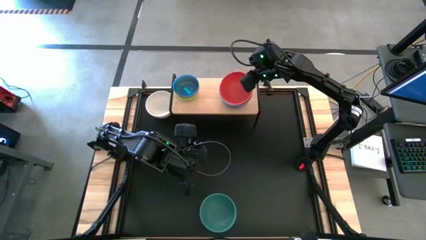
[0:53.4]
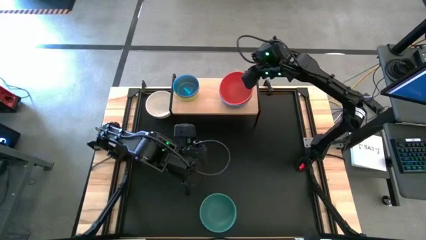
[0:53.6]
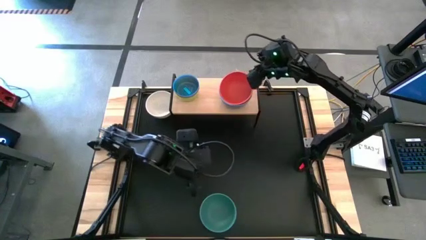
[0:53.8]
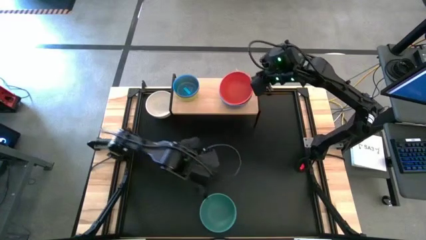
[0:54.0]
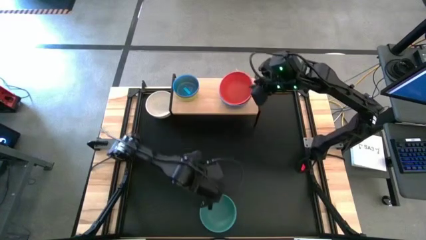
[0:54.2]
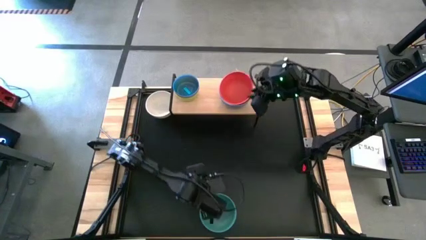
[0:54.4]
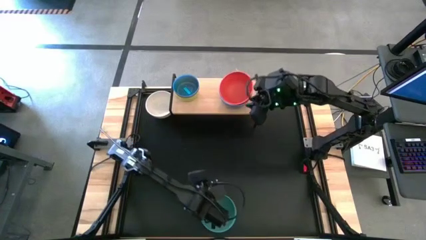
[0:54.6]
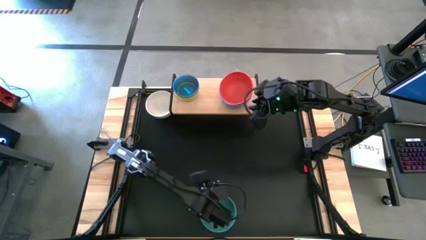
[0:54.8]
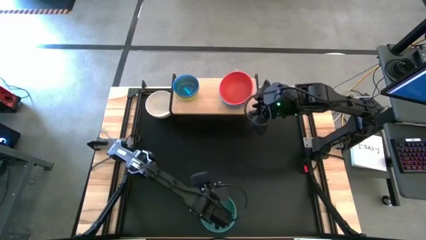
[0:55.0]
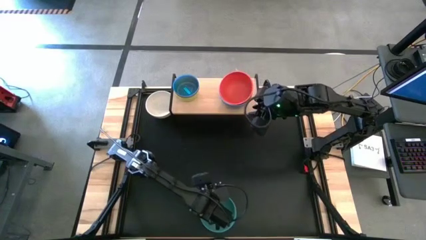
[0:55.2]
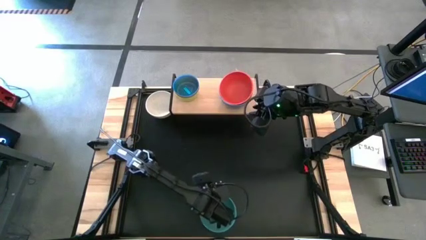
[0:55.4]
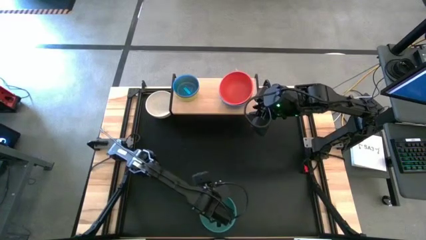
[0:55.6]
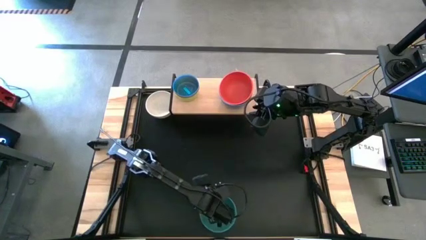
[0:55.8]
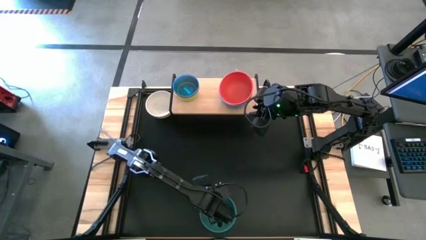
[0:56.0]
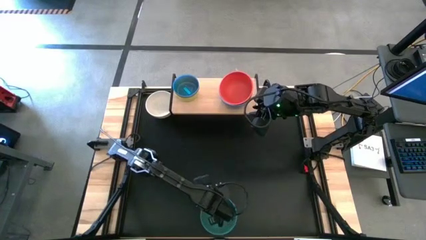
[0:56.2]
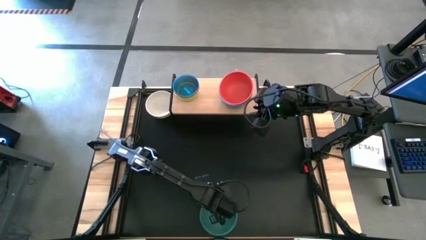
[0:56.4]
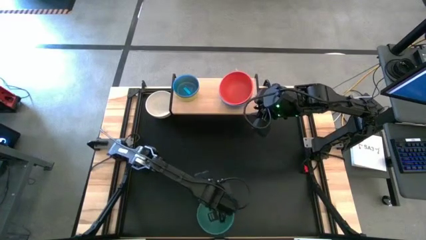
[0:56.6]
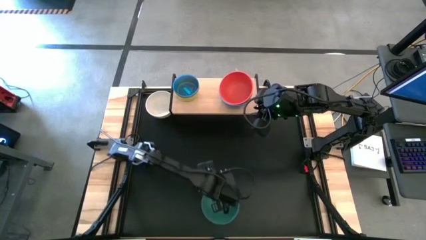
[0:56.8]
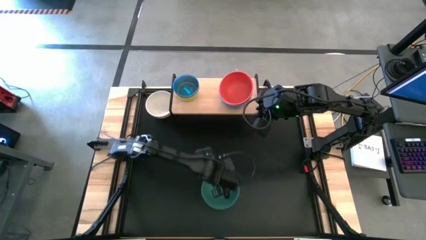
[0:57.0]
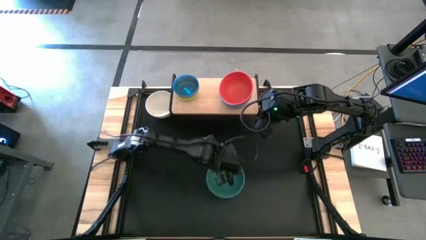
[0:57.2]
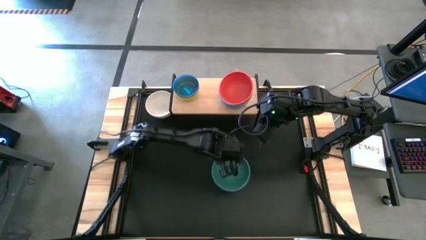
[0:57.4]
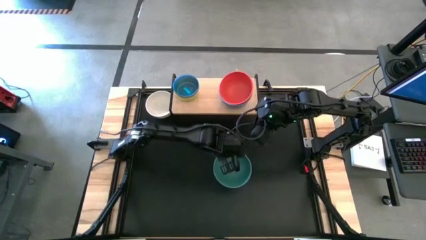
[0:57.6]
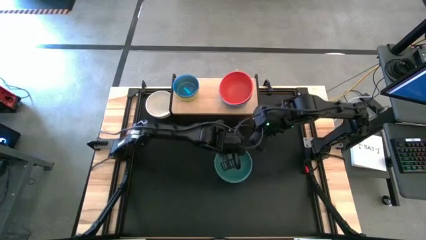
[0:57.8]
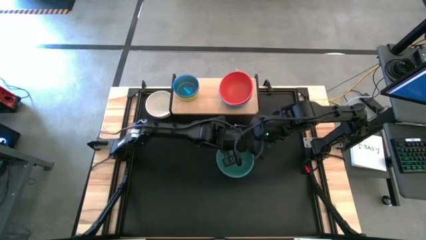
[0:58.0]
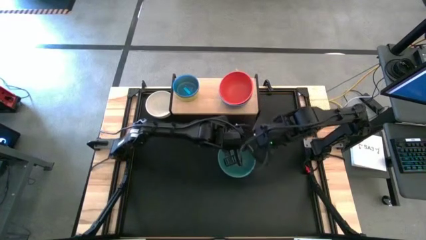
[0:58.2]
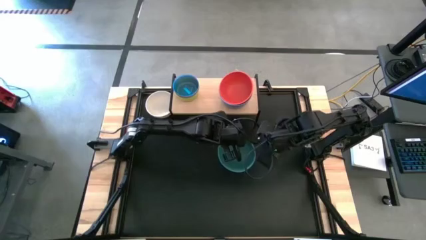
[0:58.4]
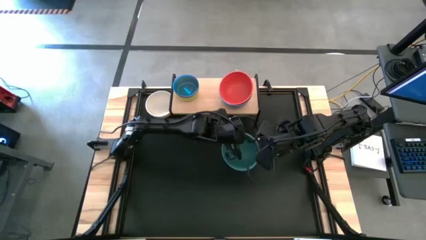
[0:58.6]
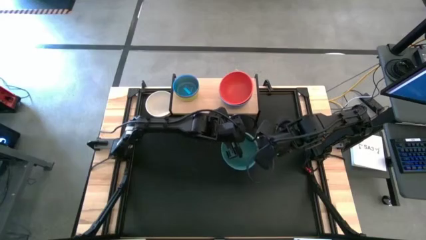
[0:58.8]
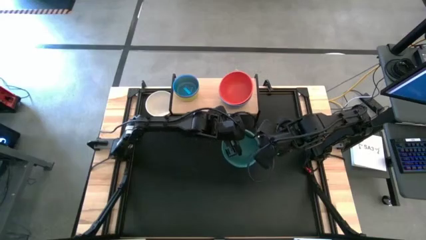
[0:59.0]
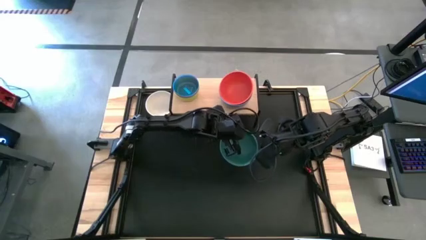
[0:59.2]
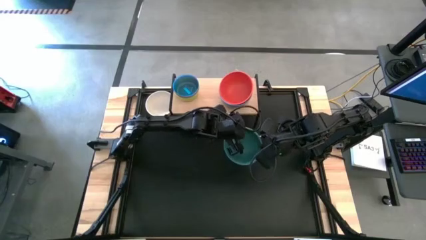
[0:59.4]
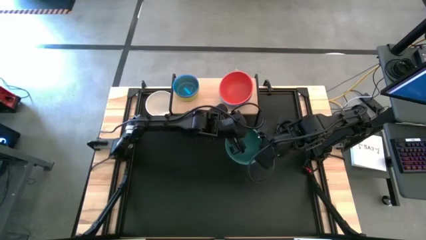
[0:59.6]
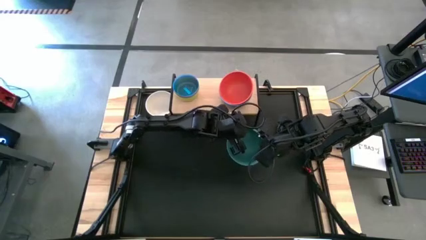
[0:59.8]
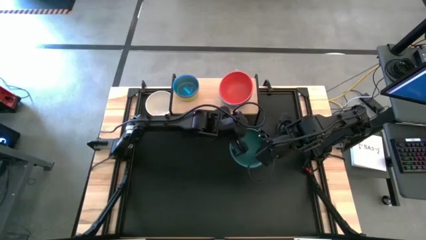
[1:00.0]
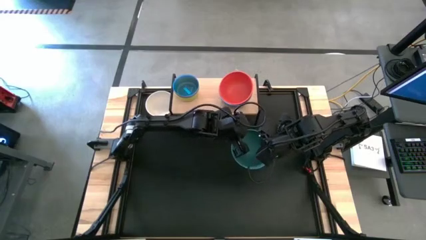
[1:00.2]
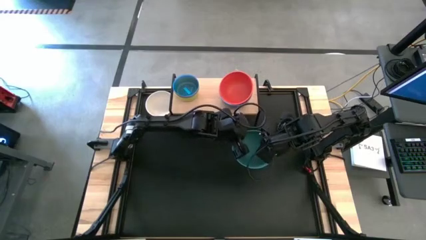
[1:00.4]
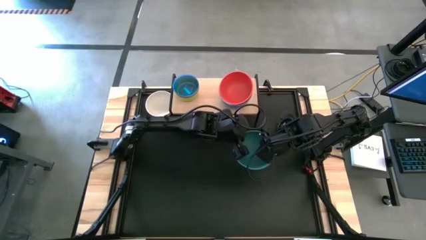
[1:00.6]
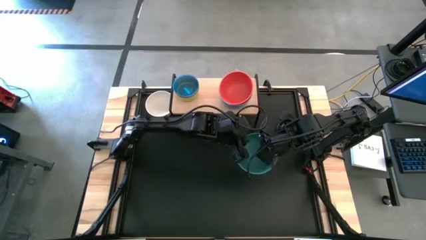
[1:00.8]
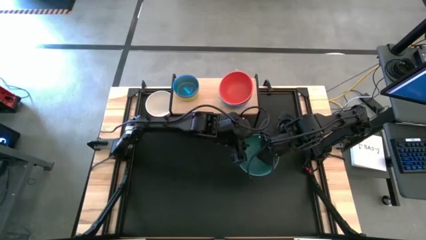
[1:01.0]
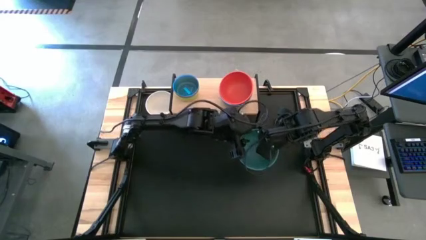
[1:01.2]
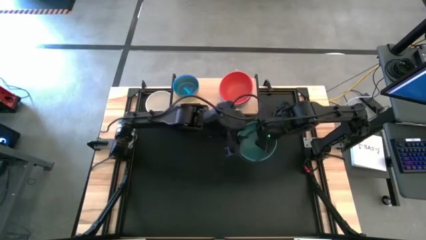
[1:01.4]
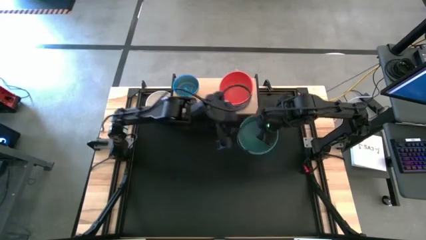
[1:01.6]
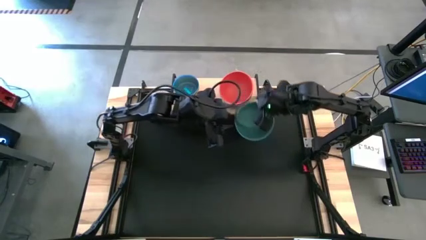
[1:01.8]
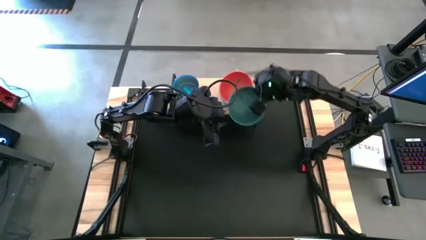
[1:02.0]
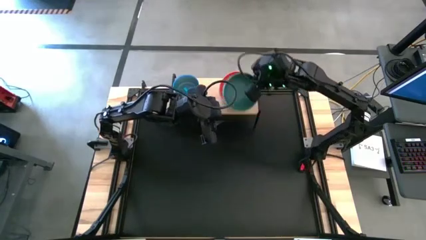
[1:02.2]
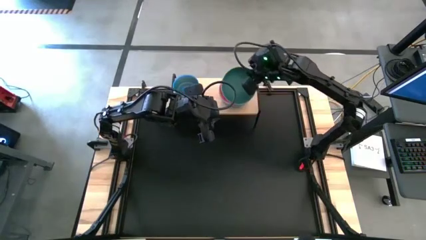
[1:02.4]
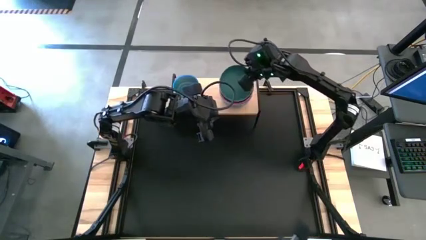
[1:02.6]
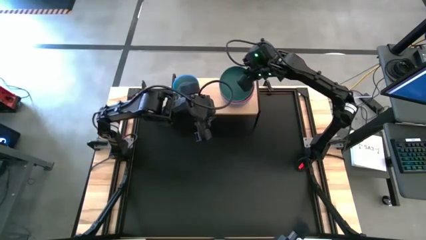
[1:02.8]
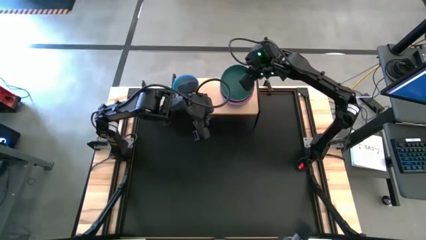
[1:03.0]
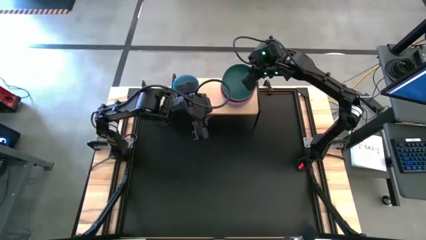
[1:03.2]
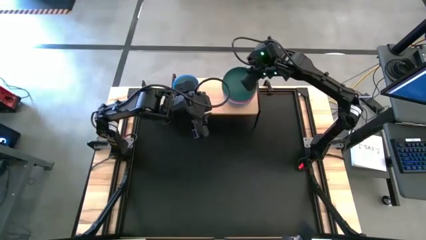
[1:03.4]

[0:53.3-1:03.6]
Task: Place and stack bowls onto a shelf
Stack the large green bowl on top of the large orange bowl on the shelf

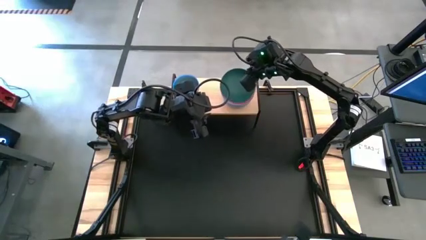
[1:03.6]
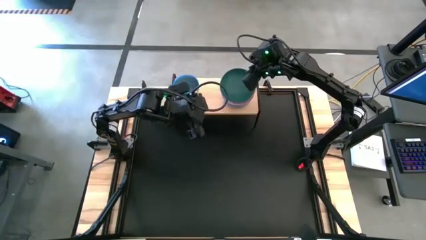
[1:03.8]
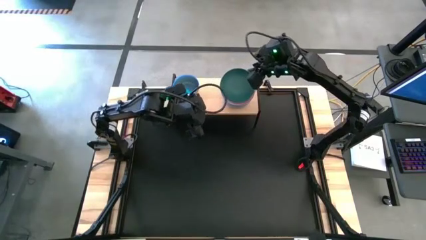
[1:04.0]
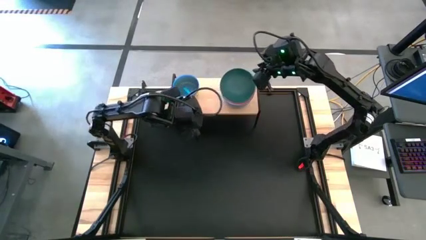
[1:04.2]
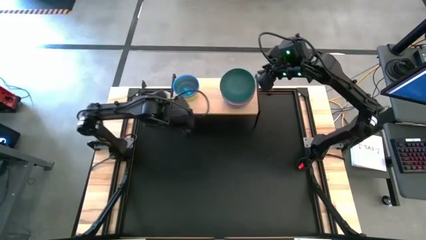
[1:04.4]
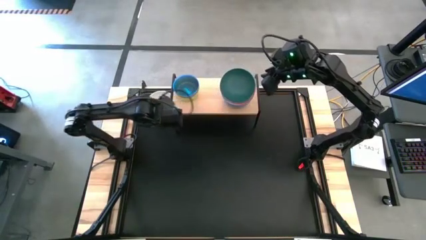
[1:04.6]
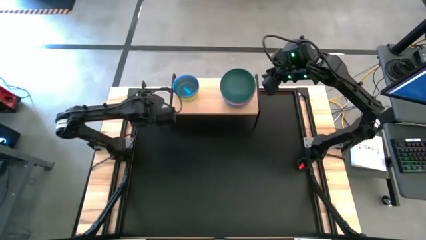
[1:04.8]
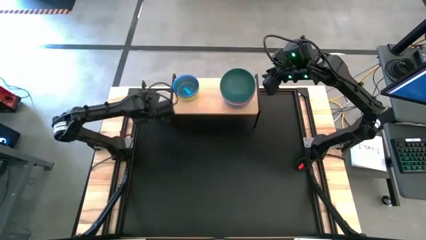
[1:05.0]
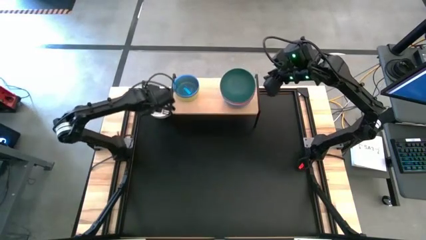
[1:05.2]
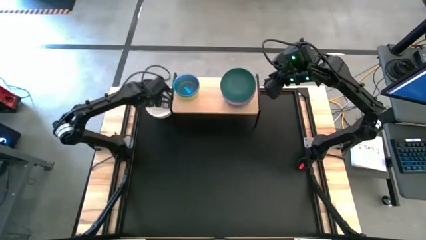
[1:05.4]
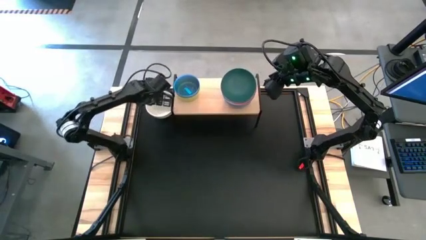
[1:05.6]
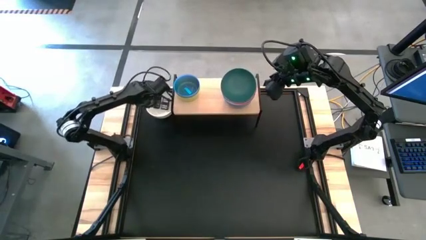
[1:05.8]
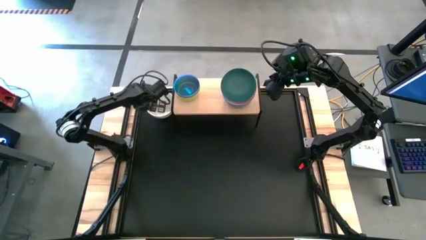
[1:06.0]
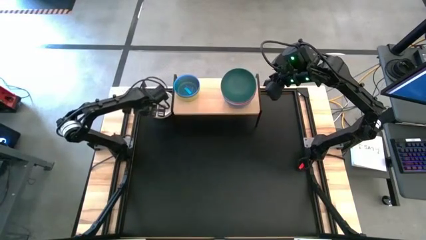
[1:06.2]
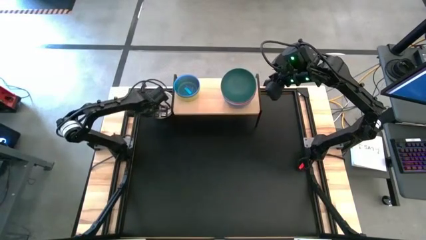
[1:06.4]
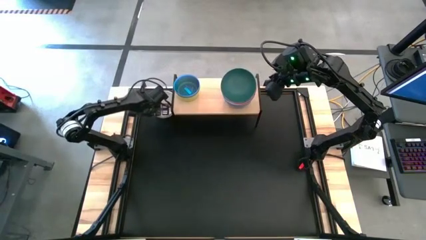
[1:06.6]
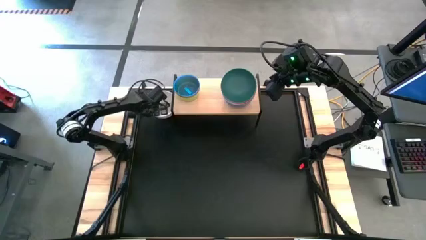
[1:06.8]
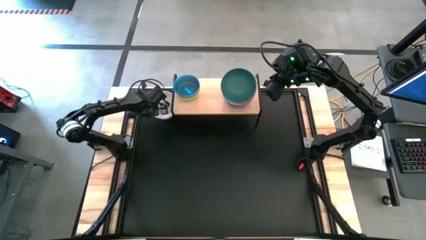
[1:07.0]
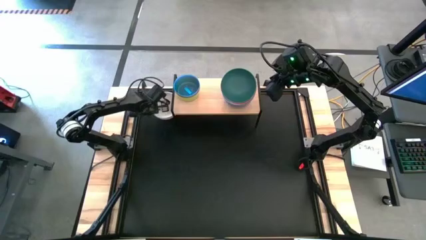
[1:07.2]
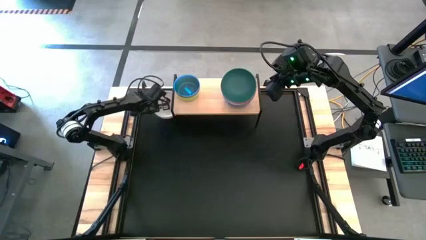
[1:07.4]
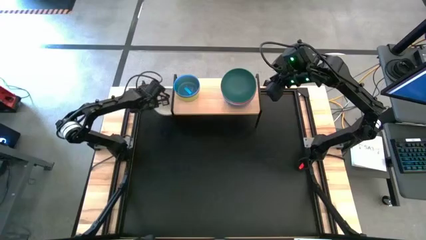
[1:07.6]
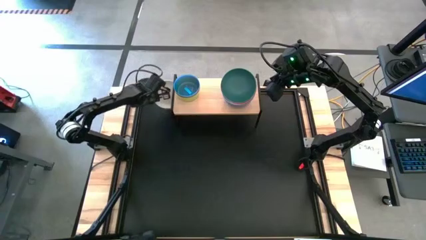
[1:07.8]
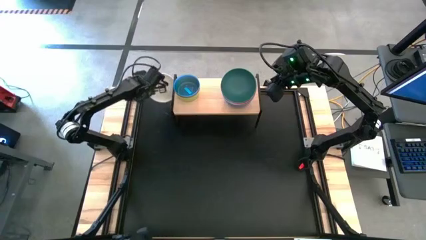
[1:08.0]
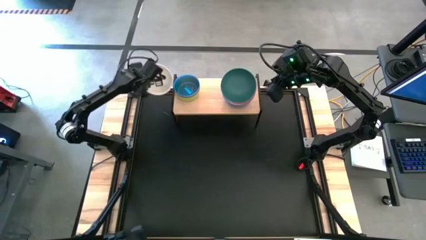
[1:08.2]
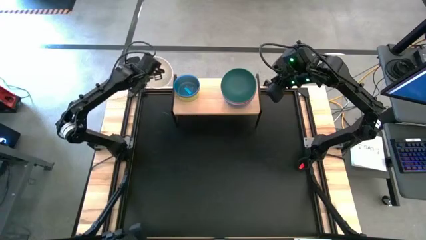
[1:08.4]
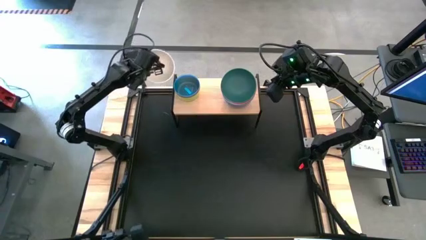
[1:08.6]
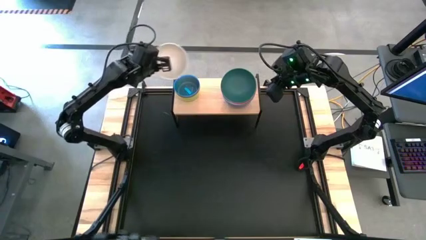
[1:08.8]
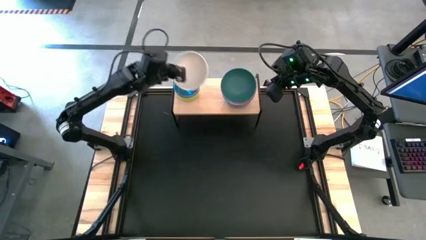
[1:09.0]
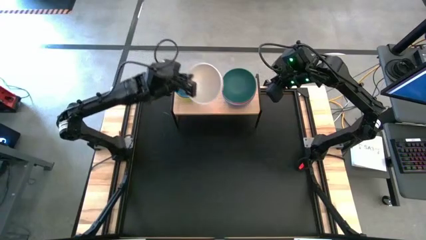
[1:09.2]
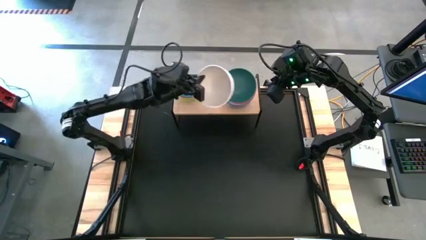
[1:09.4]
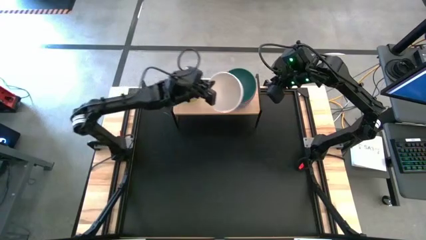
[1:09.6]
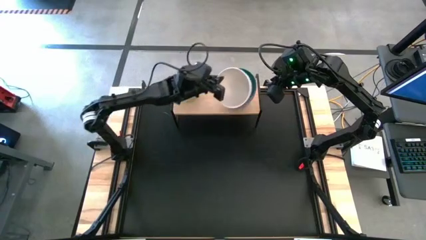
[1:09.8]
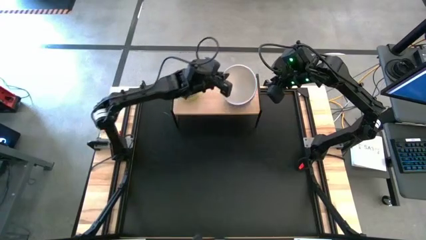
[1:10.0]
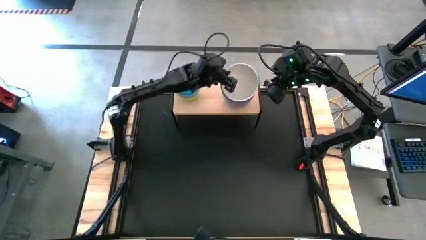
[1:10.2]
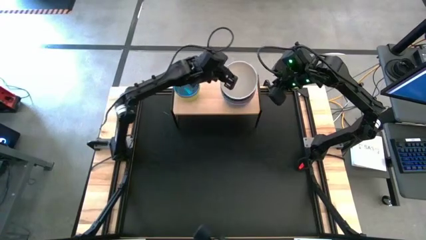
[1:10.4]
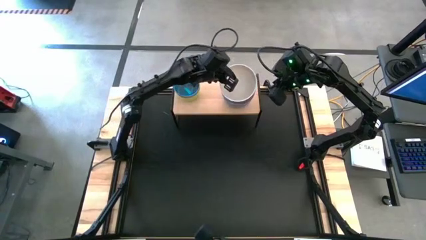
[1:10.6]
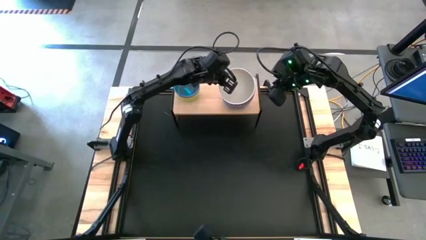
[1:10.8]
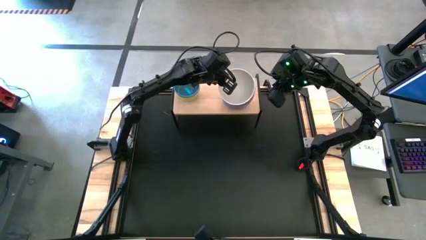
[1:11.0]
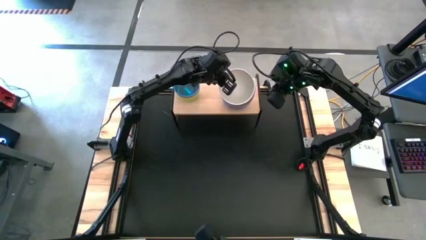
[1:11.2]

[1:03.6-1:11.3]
Stack the large white bowl on top of the large green bowl on the shelf
